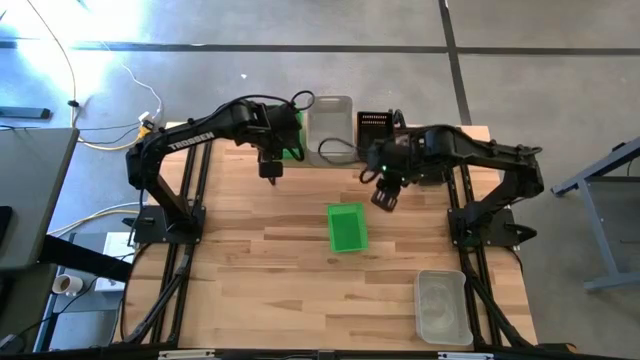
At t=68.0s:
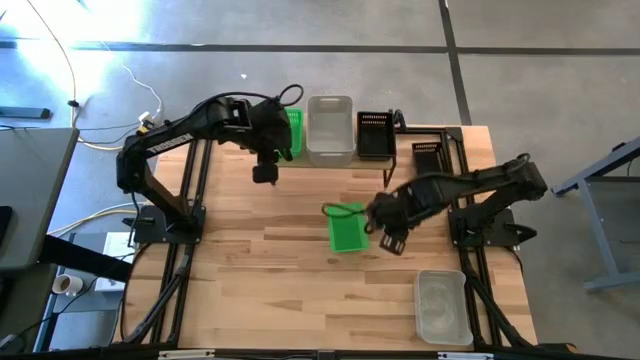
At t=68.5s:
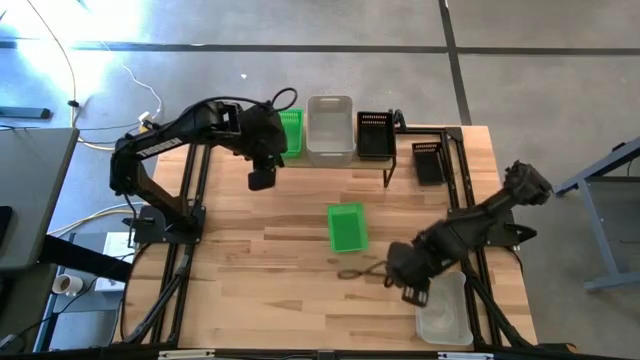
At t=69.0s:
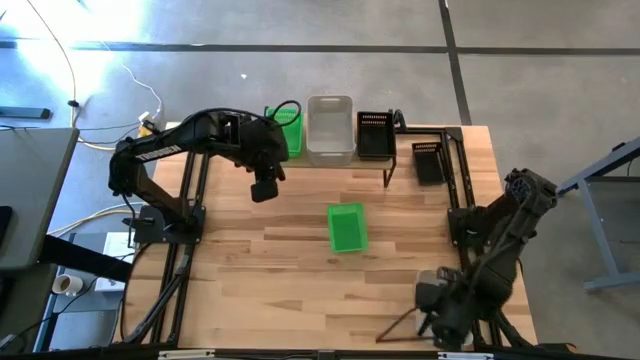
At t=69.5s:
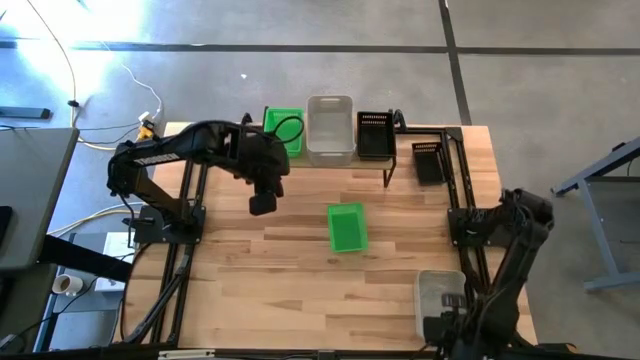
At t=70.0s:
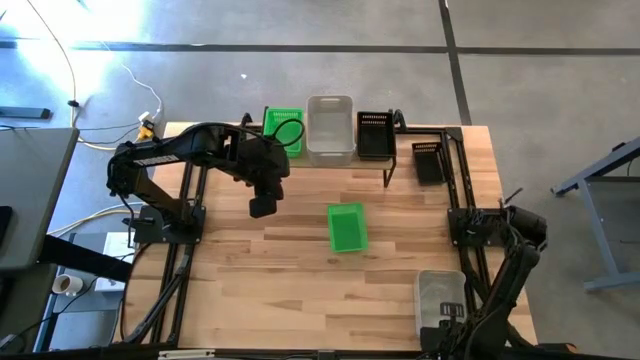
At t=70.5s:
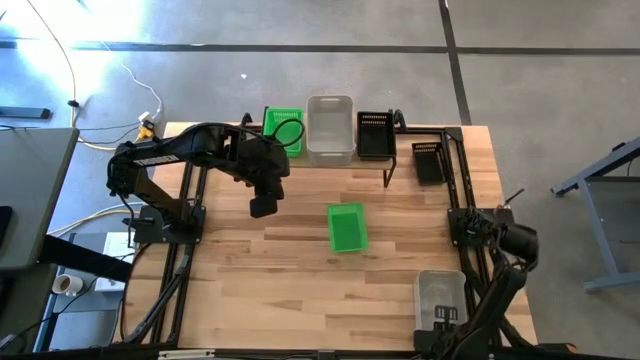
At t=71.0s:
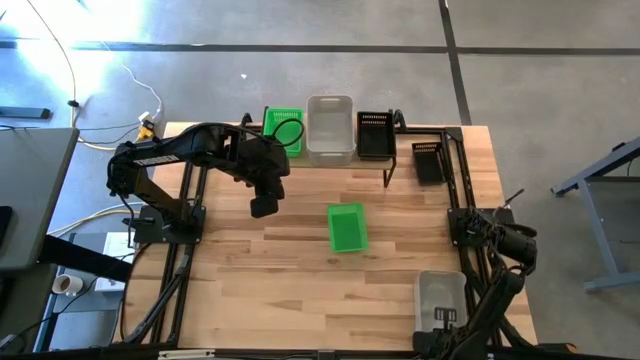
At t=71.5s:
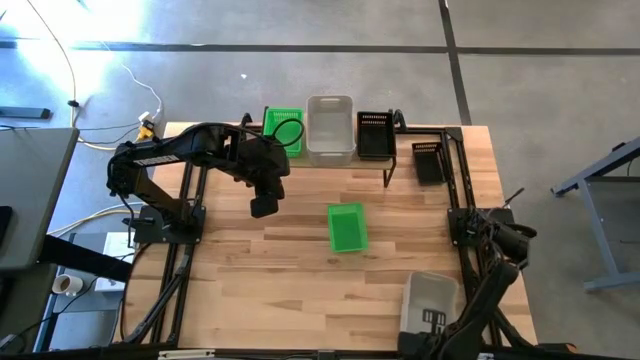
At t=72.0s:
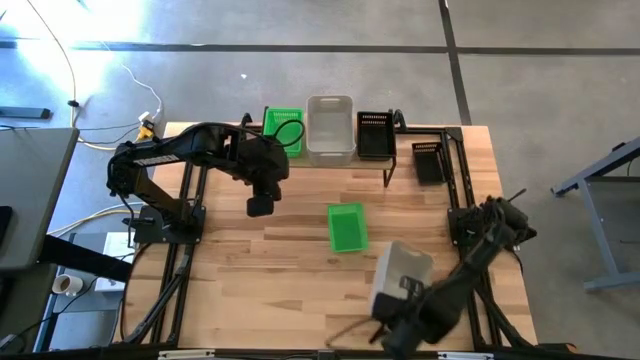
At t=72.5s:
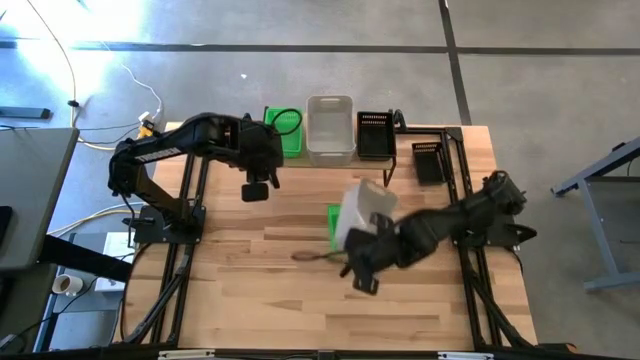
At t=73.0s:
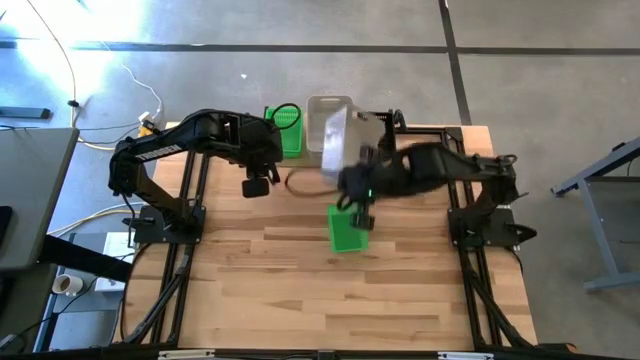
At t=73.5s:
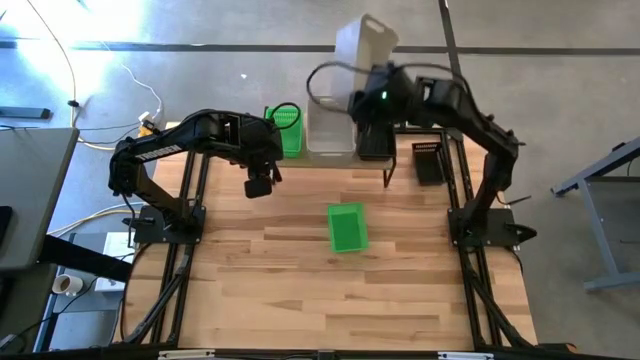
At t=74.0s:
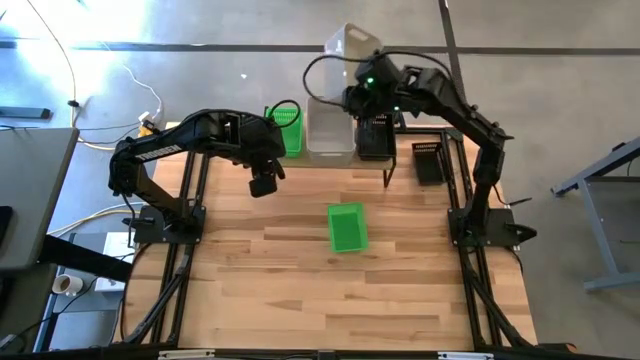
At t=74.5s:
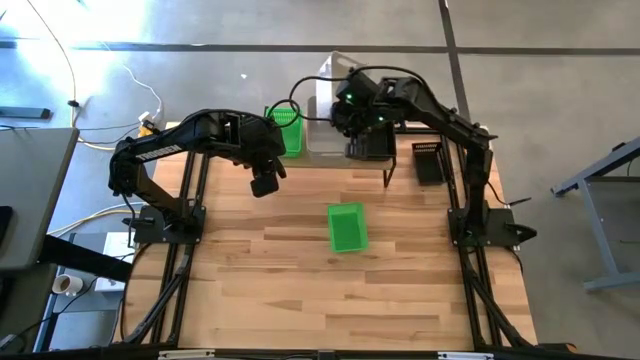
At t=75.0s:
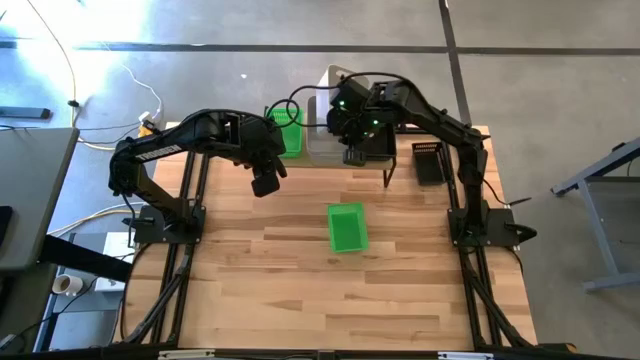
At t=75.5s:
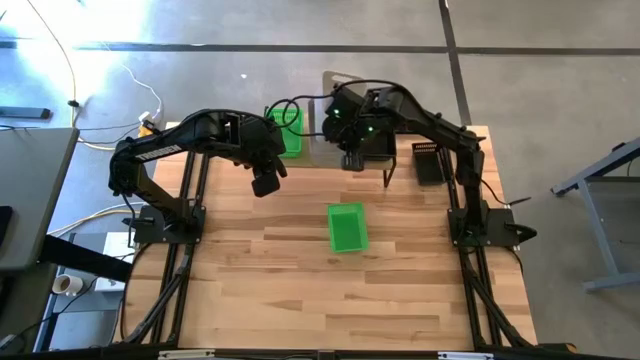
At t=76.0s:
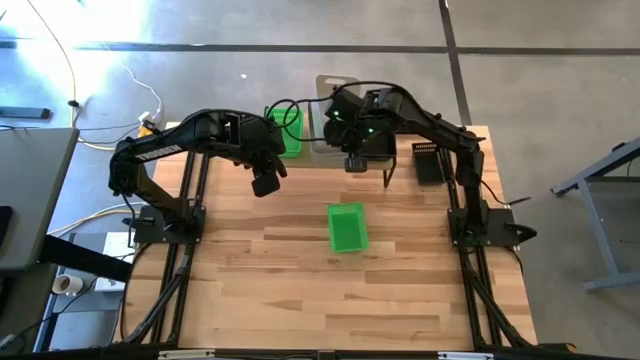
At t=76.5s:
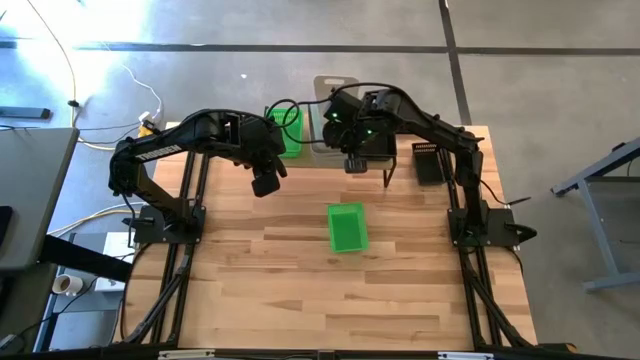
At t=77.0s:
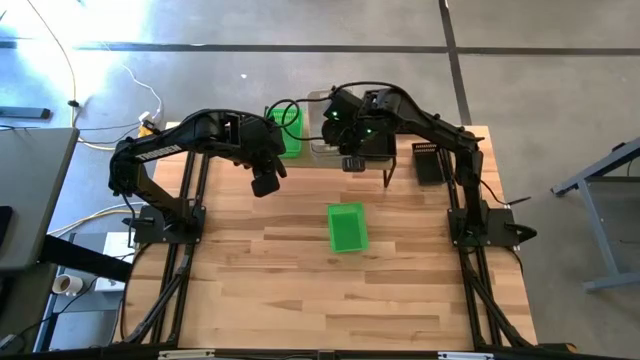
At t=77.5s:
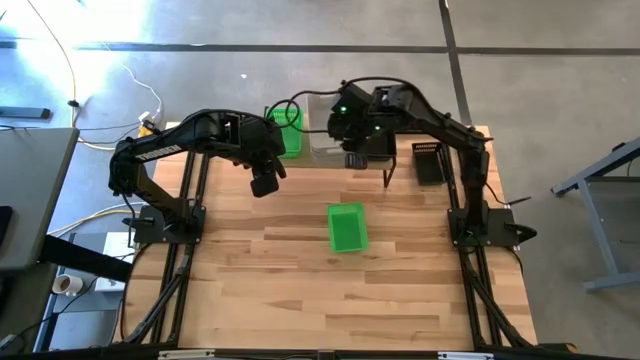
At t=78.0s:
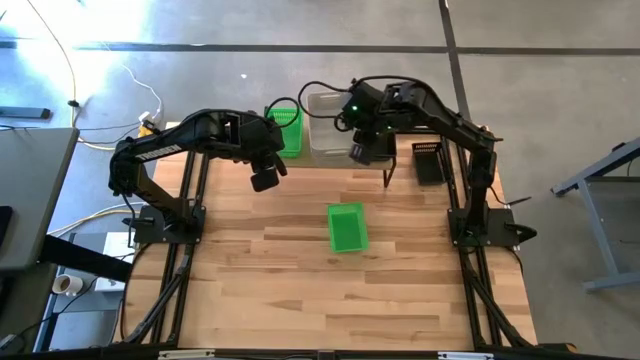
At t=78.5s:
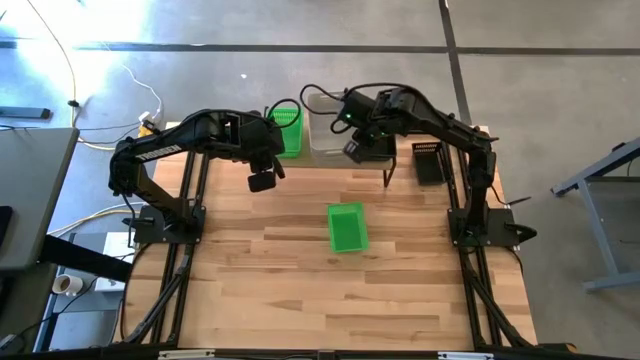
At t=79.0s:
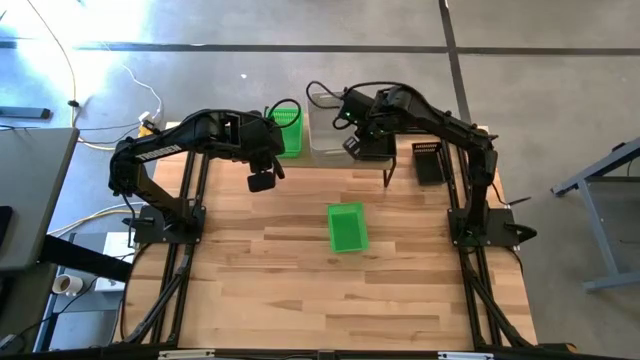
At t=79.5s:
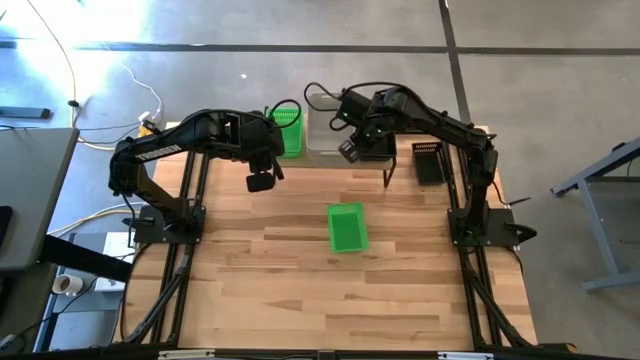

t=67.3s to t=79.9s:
Task: Stack baskets on shelf by color
Stack the gray bin on the gray bin on the shelf

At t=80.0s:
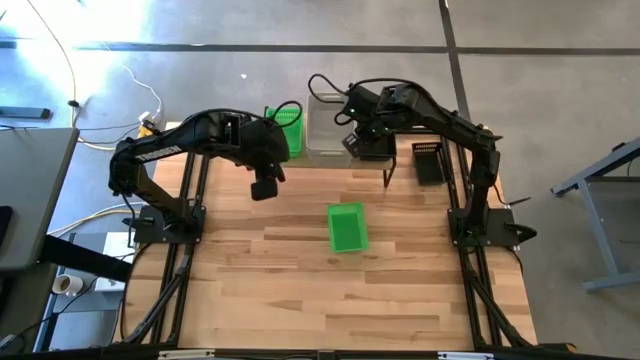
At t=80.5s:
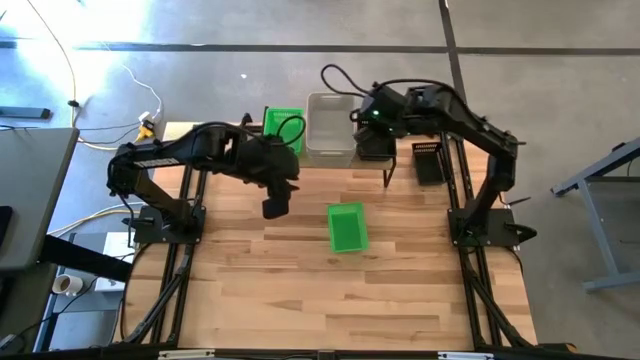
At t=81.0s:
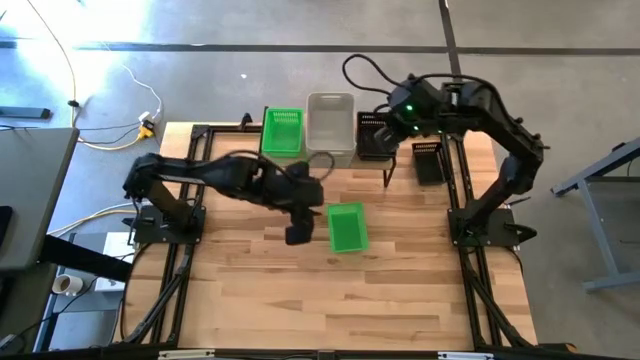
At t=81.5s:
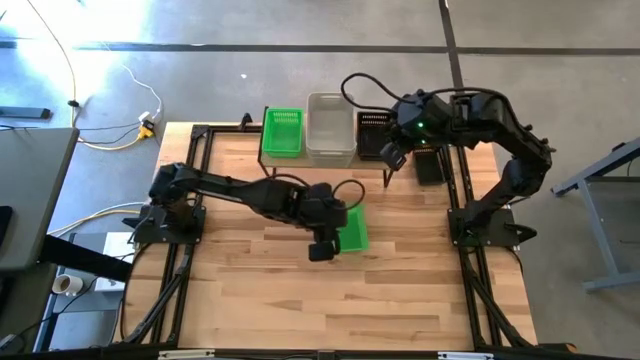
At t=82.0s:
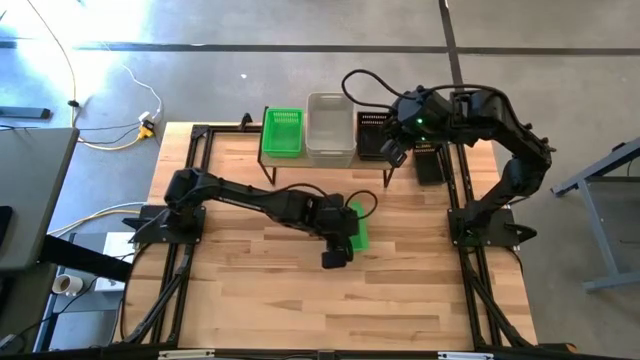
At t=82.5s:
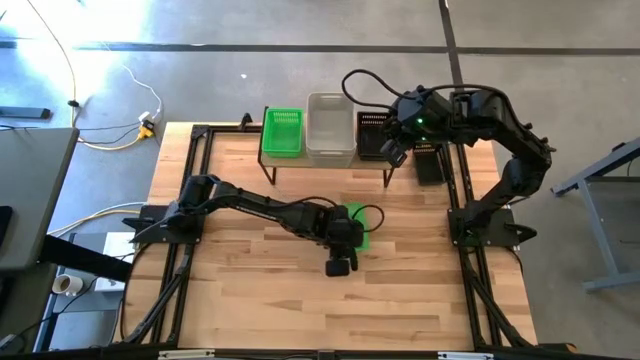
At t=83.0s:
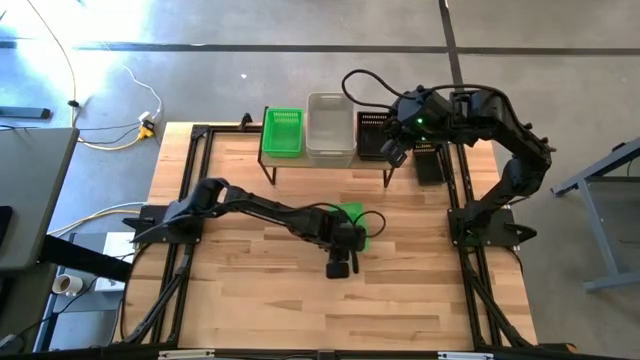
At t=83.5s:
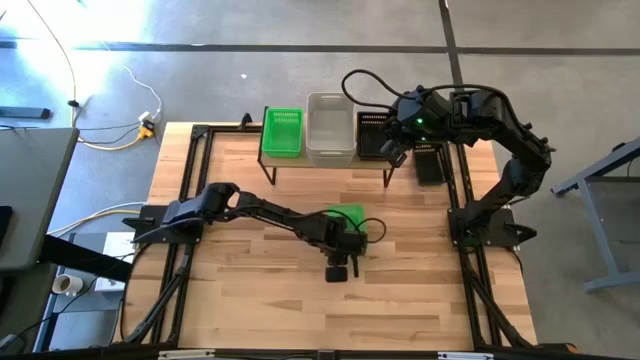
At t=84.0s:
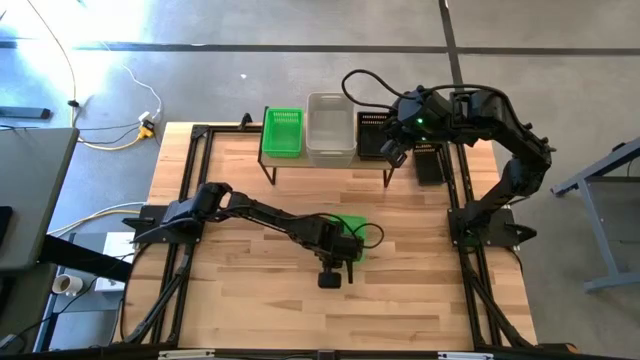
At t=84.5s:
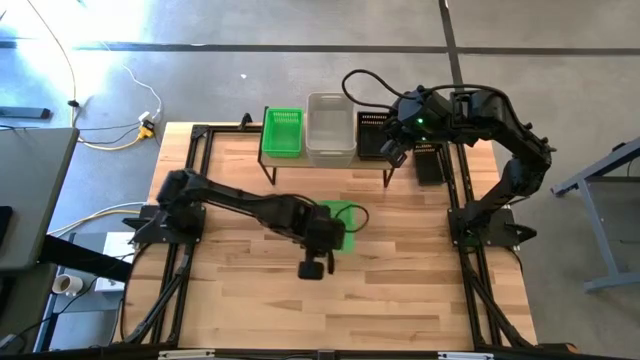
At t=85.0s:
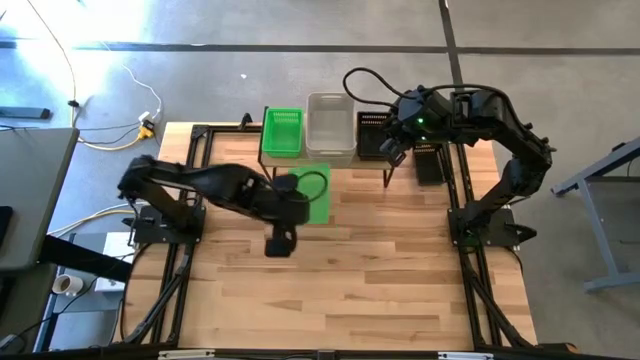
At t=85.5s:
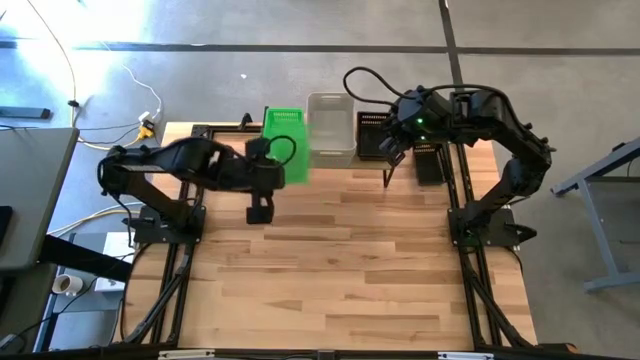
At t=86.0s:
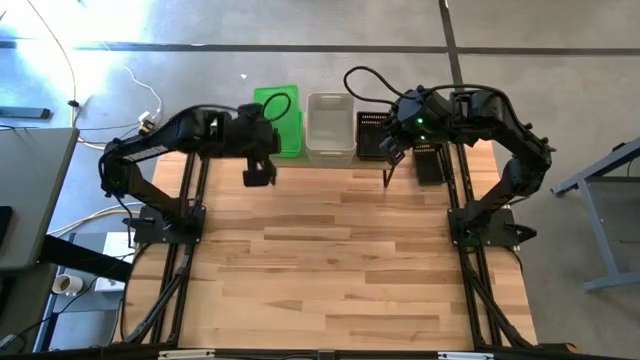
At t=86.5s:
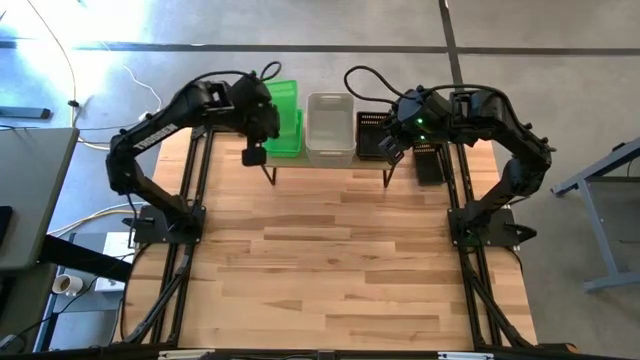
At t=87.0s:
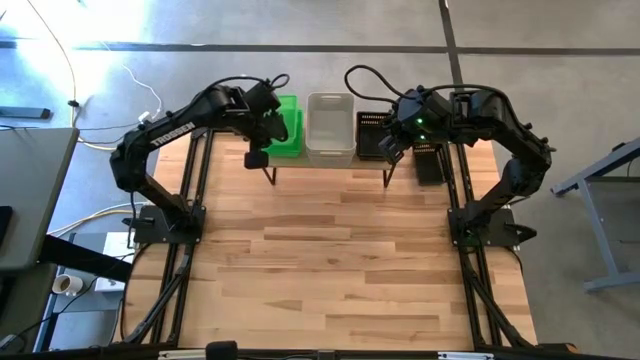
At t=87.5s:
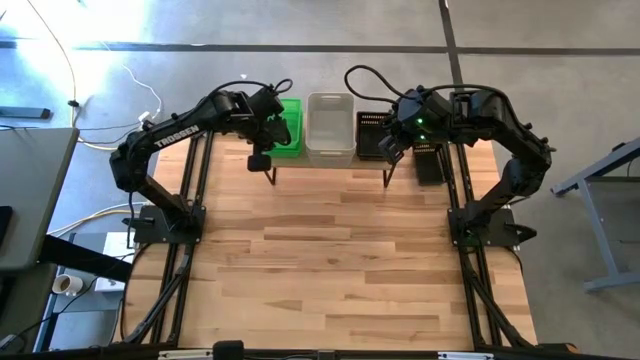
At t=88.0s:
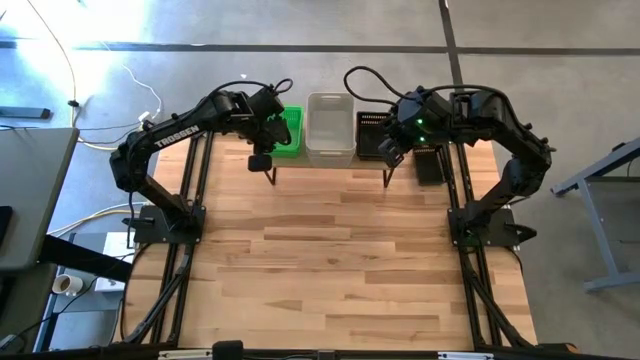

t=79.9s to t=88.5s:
Stack the green bin on the green bin on the shelf
